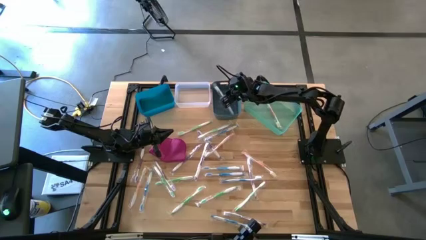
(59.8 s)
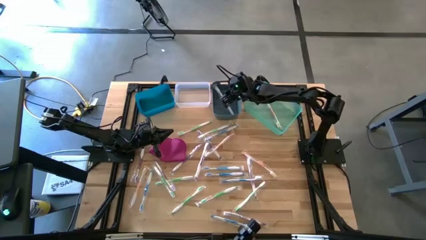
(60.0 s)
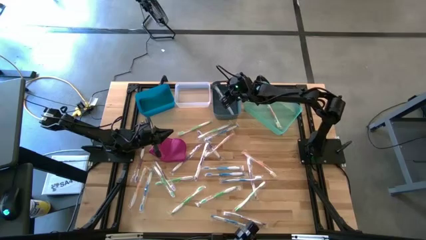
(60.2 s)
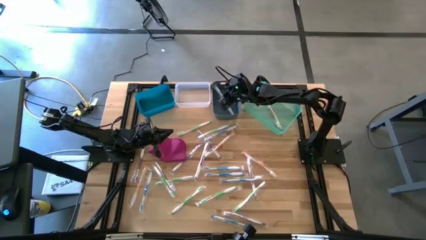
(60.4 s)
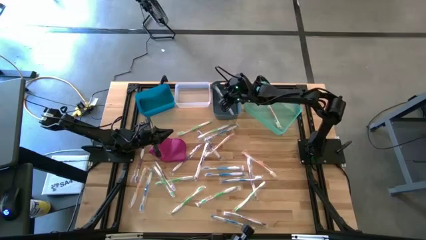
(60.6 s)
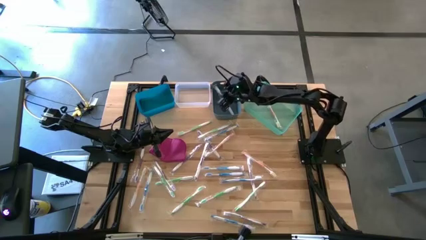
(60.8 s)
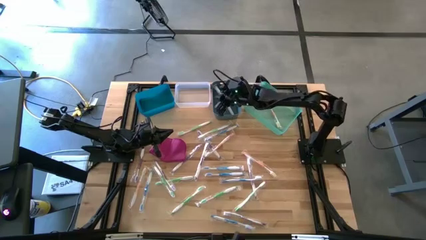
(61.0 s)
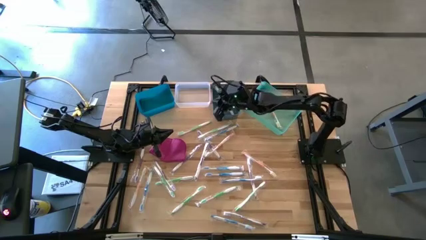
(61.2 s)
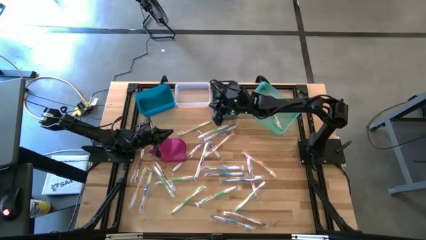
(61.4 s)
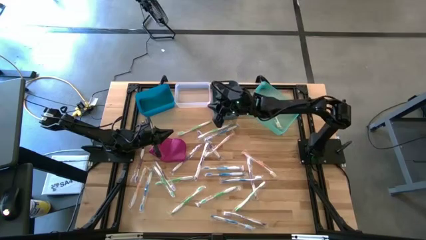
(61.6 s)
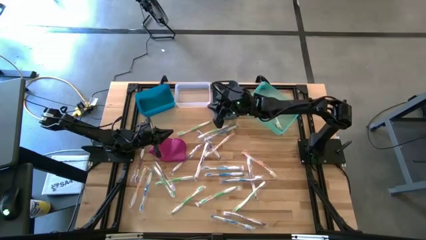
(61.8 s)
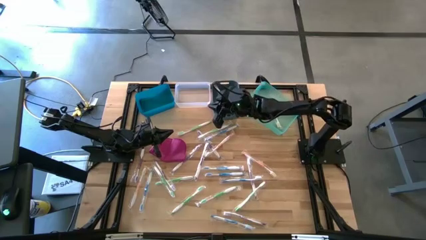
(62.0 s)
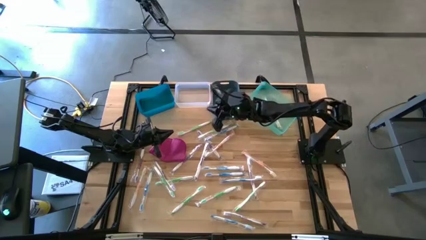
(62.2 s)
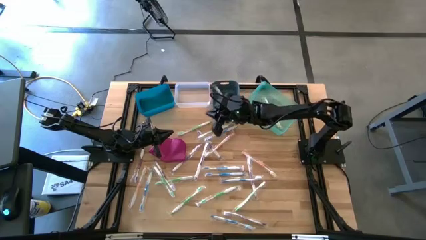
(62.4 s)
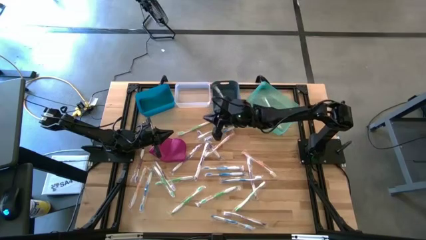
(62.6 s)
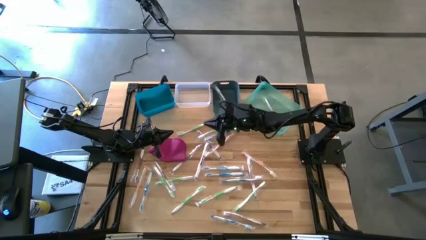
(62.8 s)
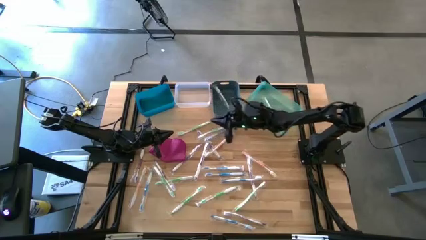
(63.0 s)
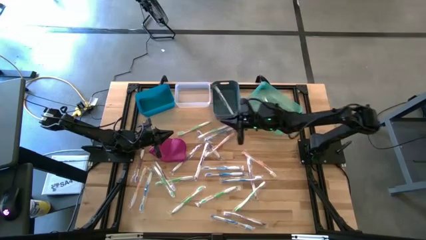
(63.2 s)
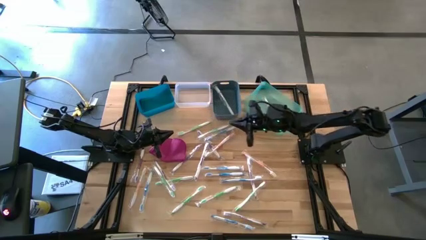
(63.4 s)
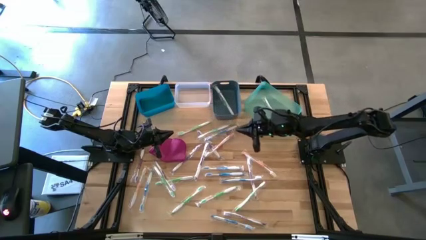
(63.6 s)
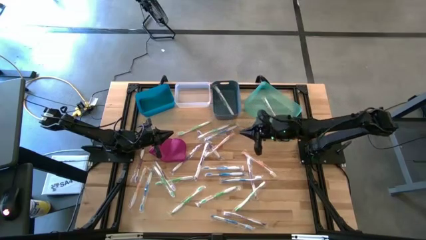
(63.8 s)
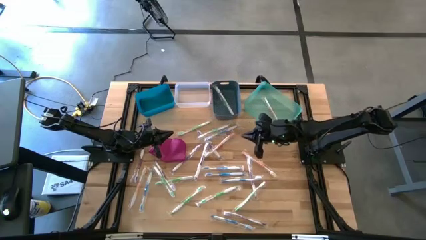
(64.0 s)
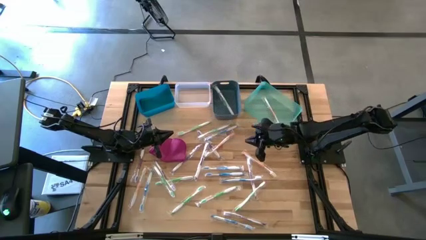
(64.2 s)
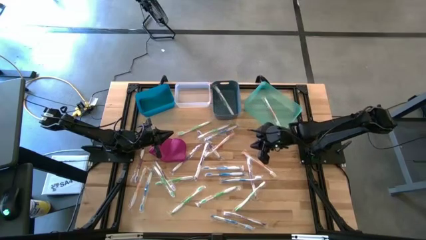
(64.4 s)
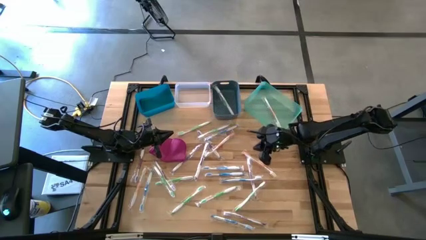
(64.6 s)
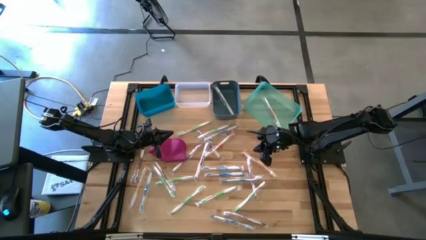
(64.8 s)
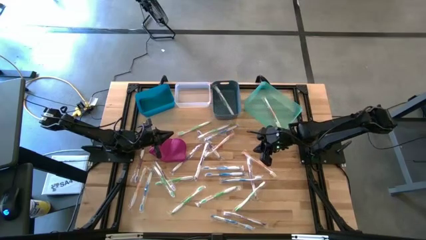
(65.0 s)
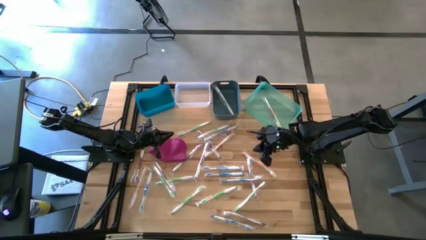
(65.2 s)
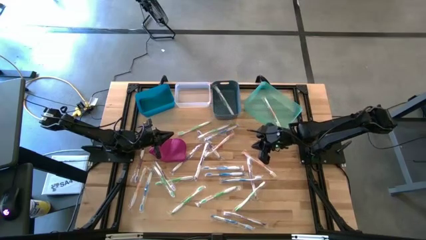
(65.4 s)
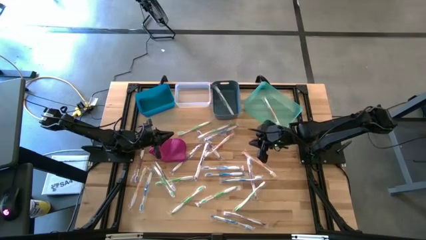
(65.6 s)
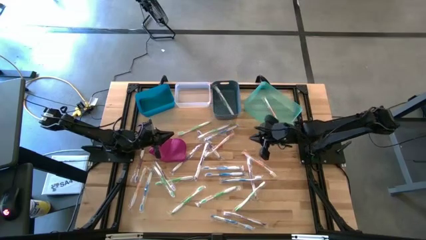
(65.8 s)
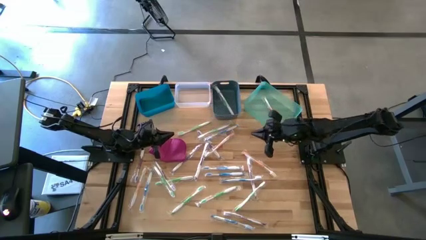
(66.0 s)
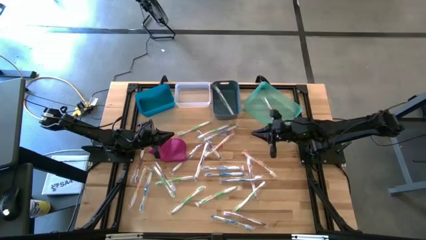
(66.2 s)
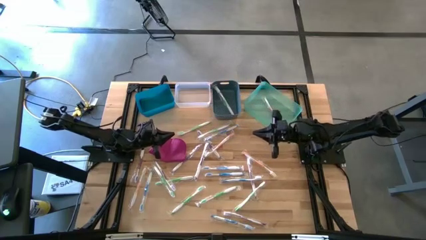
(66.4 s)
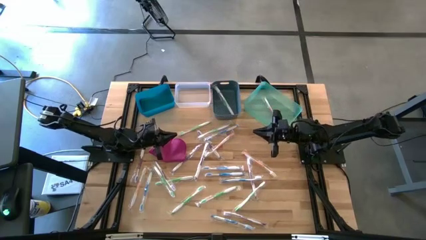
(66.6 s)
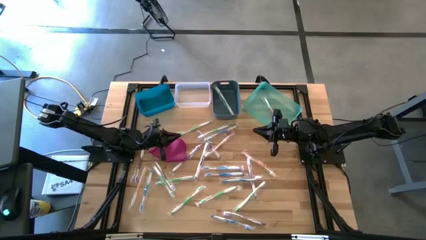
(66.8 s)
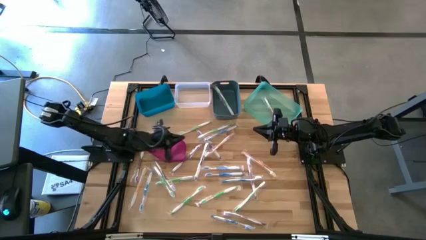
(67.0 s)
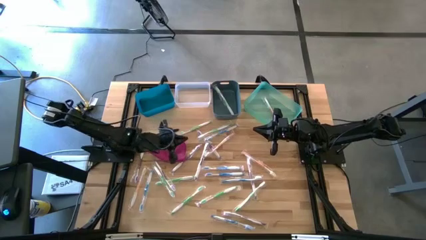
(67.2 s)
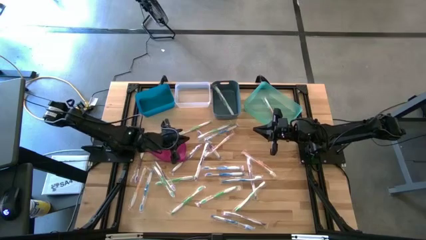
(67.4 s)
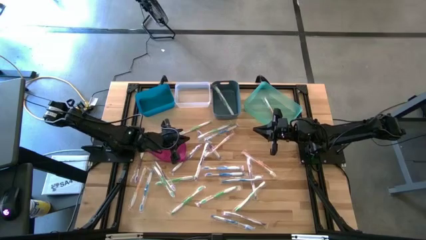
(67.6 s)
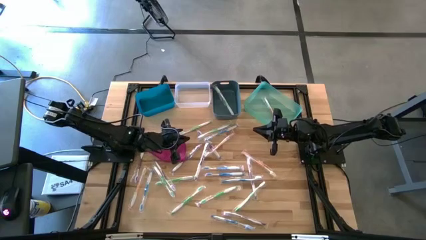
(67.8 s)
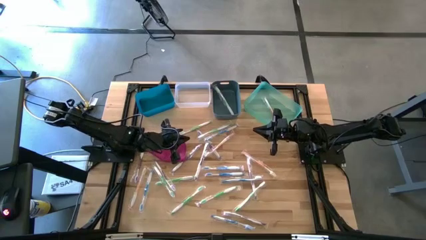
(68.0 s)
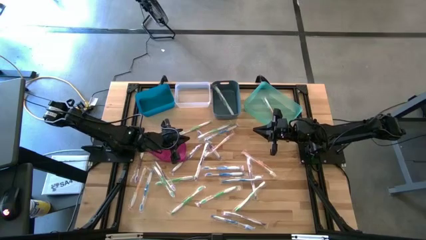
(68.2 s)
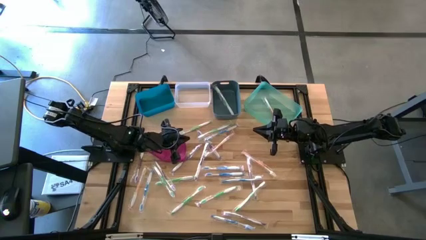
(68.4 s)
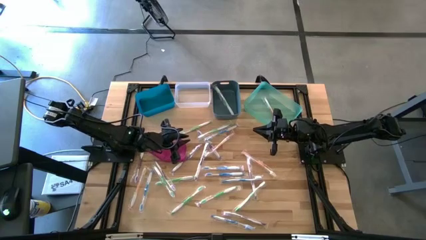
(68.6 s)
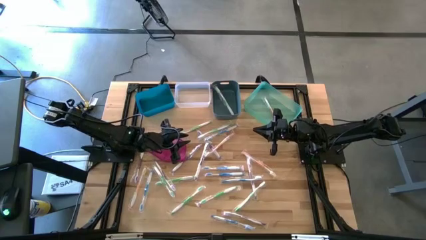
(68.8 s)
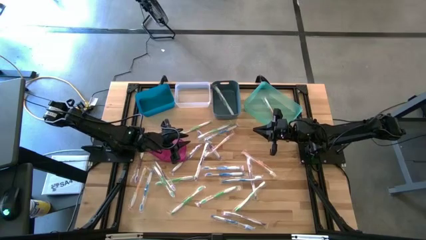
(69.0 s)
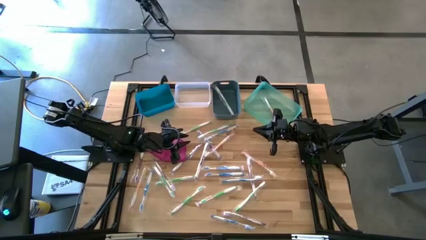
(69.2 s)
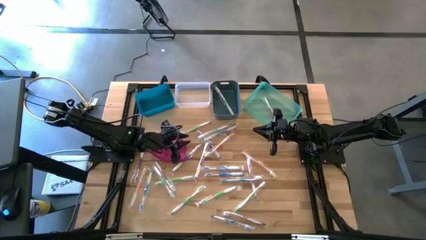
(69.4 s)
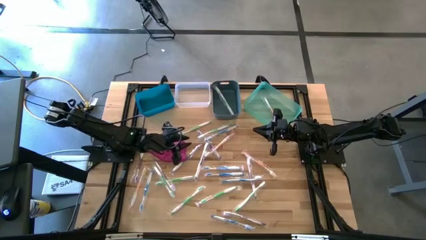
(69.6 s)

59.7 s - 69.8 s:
Task: Pick & Place Toothbrushes
Put the violet toothbrush into the white bin

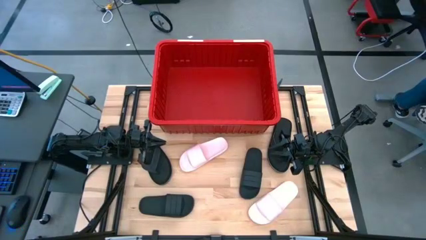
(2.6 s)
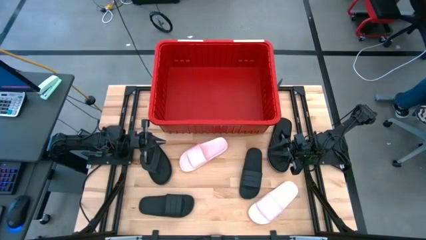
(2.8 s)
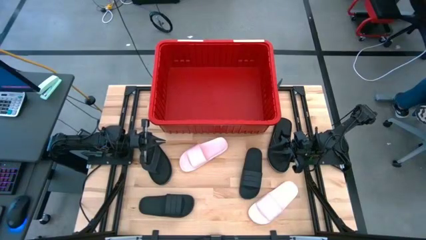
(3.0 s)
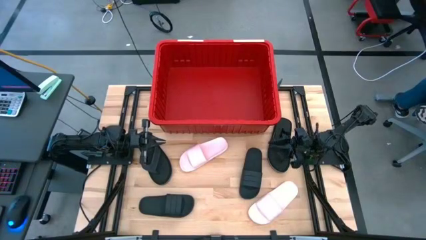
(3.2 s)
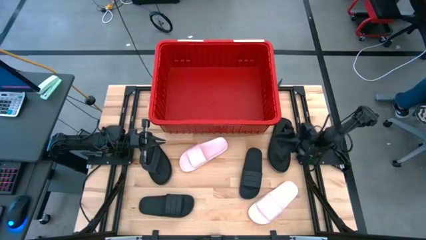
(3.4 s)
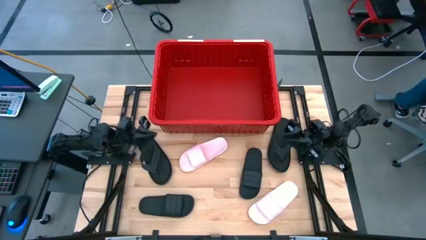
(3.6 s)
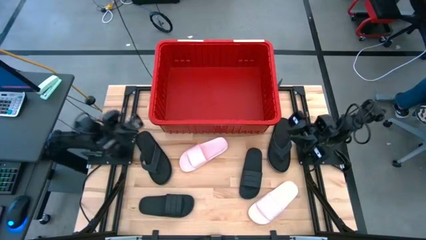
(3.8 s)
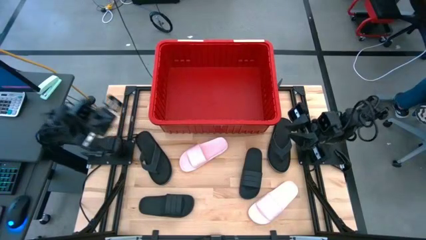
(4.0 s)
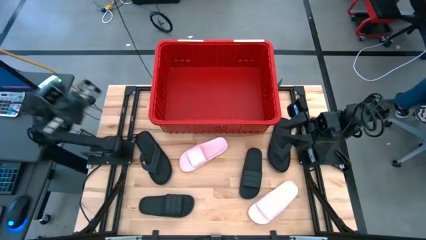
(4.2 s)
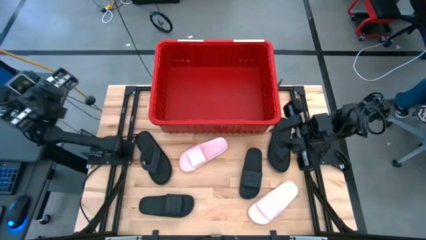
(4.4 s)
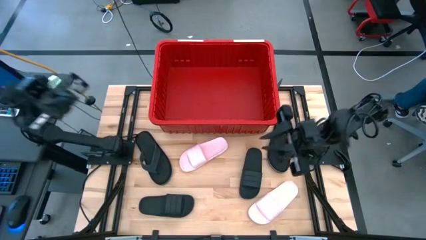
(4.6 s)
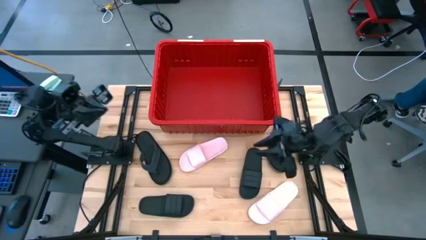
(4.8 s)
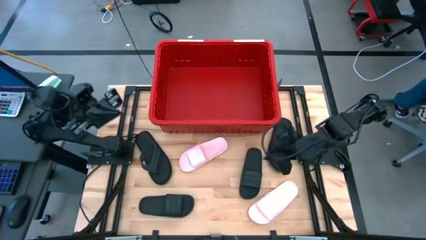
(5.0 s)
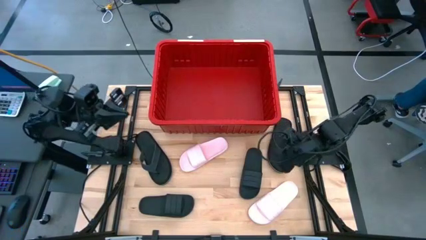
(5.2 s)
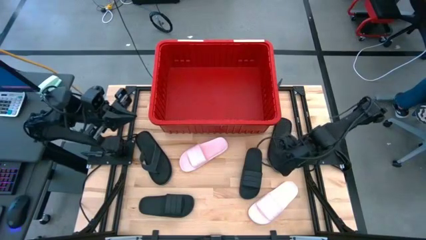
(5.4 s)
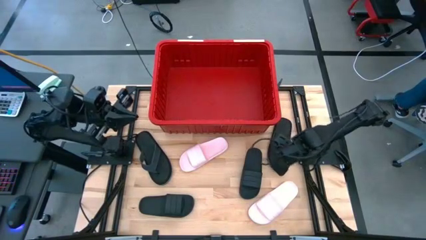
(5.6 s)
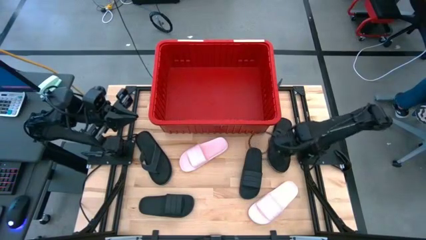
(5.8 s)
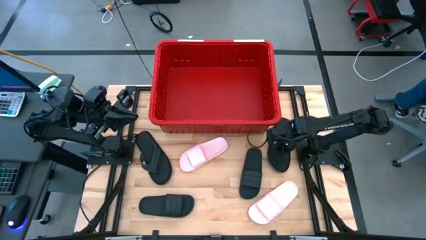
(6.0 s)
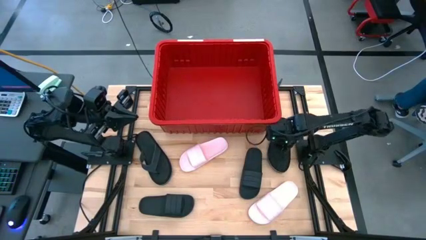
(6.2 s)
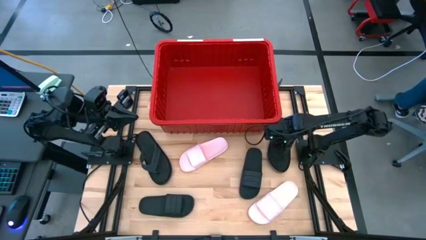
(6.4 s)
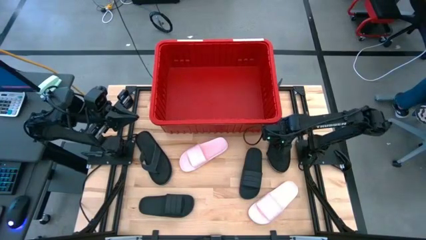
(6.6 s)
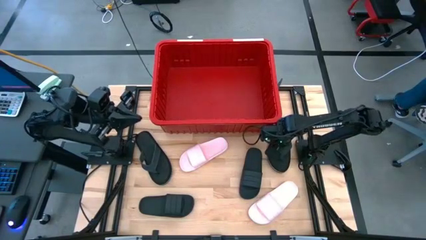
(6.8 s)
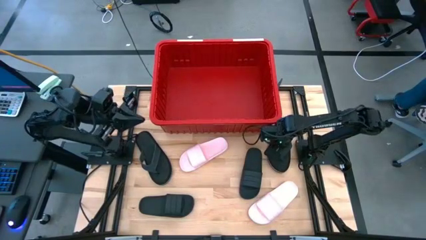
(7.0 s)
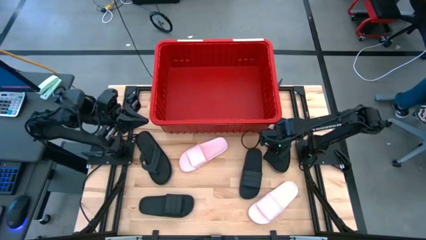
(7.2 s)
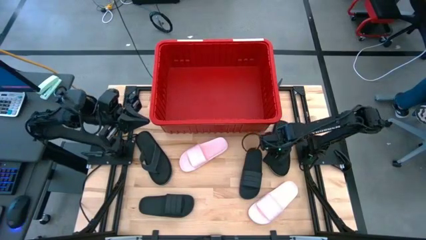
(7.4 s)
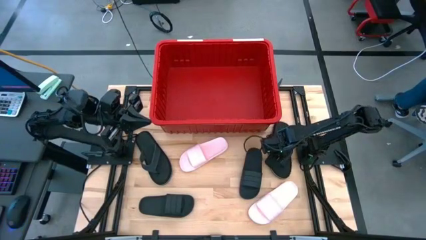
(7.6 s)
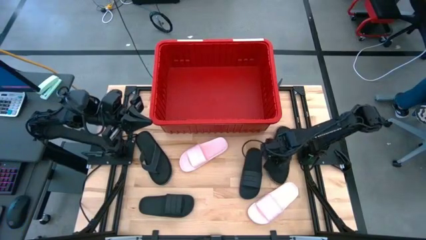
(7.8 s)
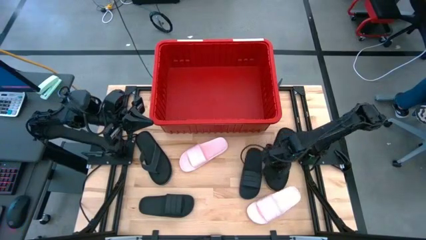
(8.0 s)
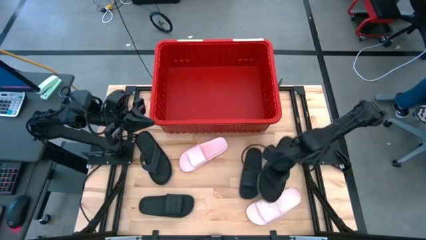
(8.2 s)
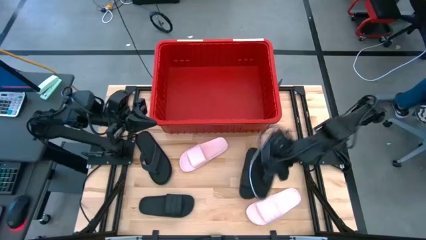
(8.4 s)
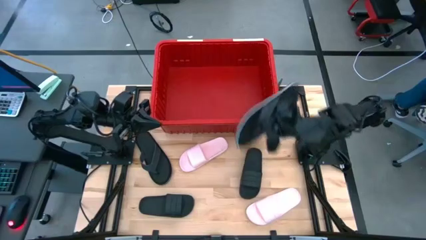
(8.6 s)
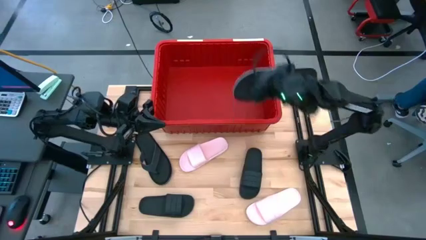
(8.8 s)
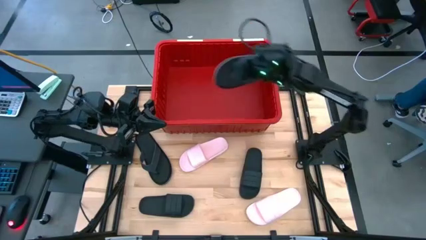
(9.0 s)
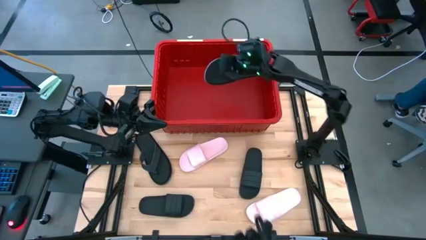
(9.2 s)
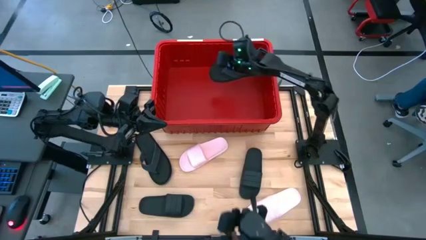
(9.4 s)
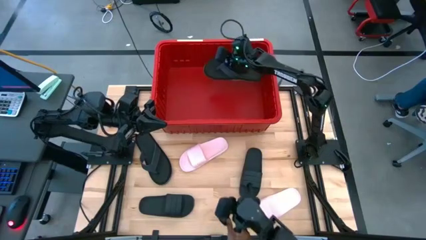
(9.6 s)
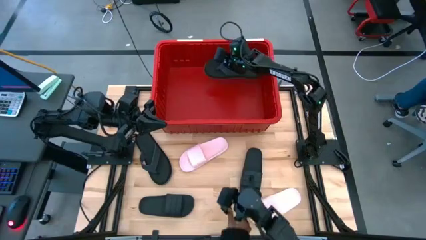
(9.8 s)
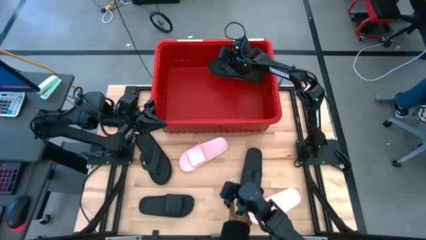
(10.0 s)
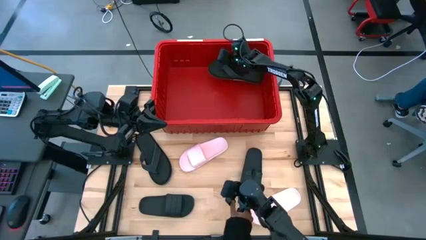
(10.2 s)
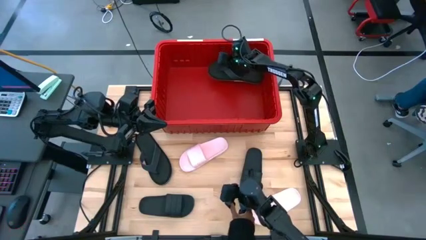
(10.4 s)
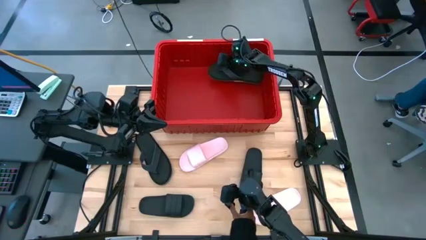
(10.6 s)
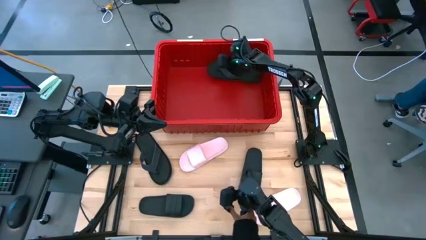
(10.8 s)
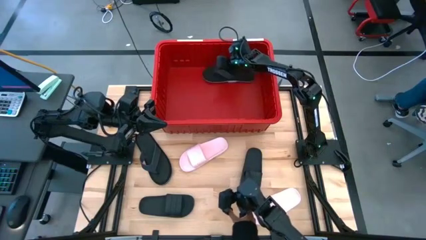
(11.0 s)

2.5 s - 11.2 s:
Task: Pick and place slides into bin
Put the right black slipper into the red bin
